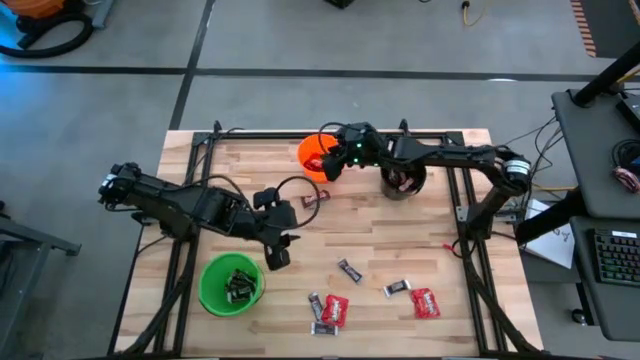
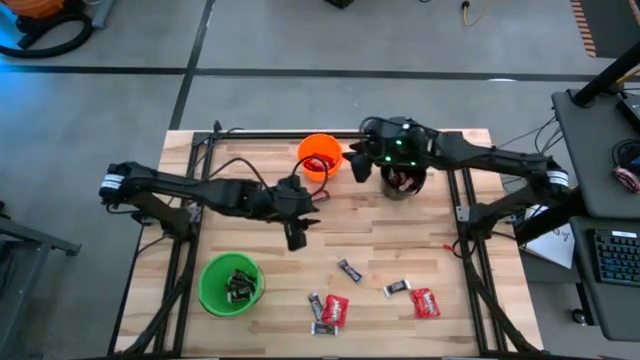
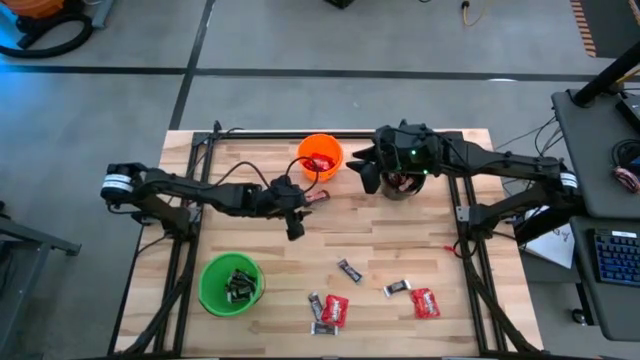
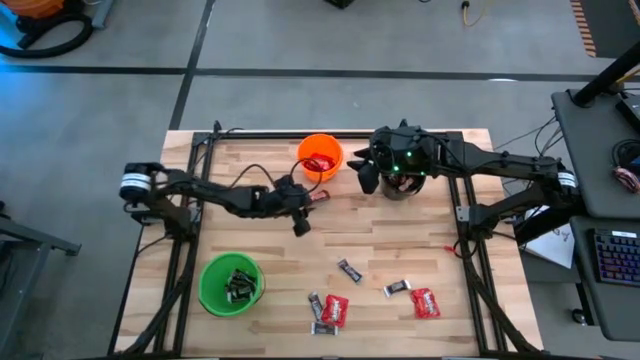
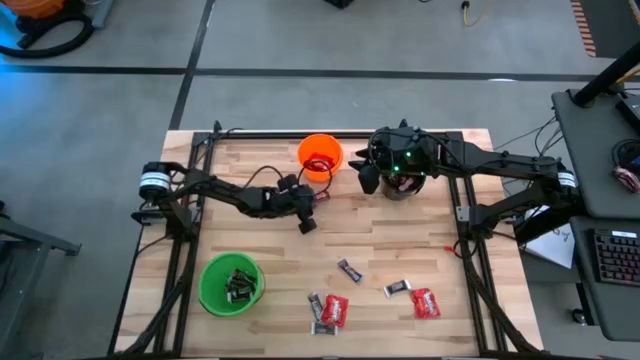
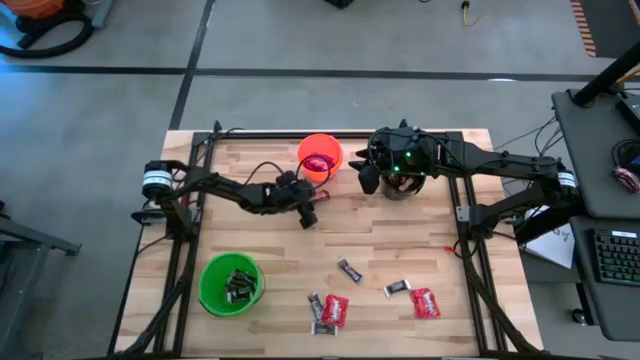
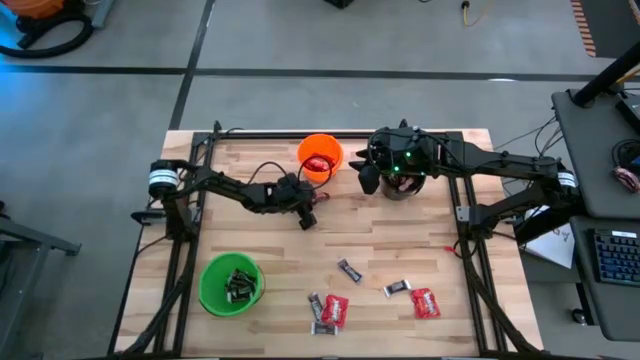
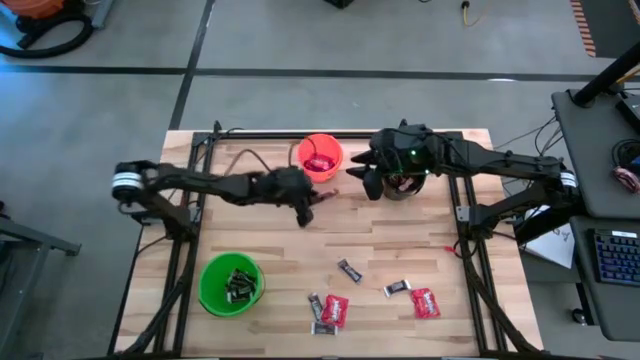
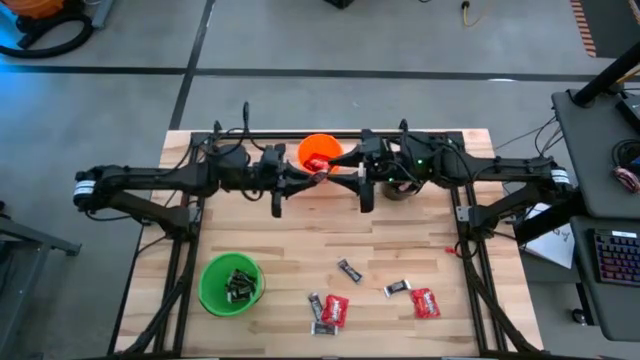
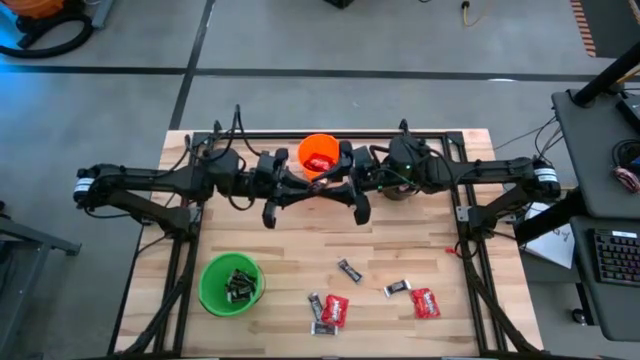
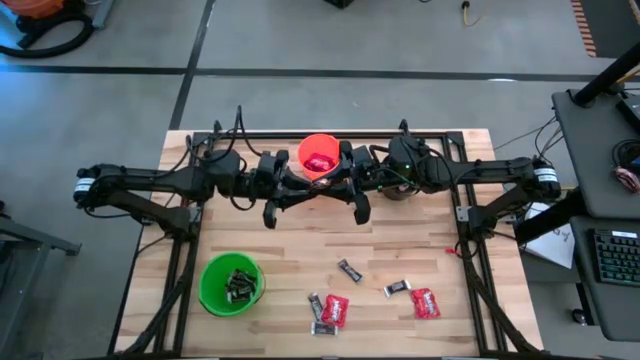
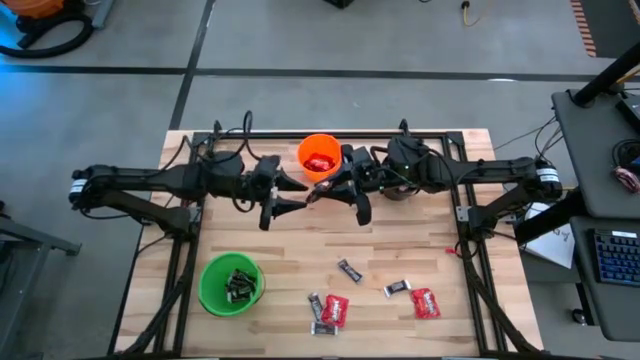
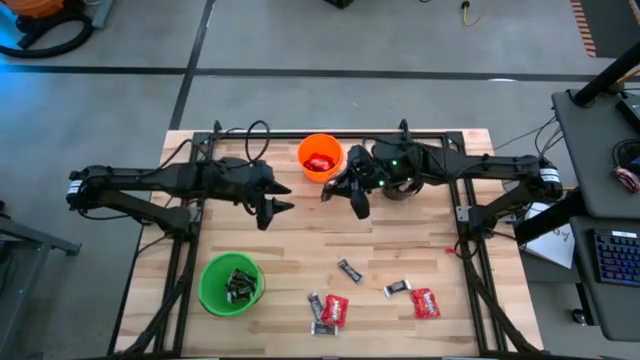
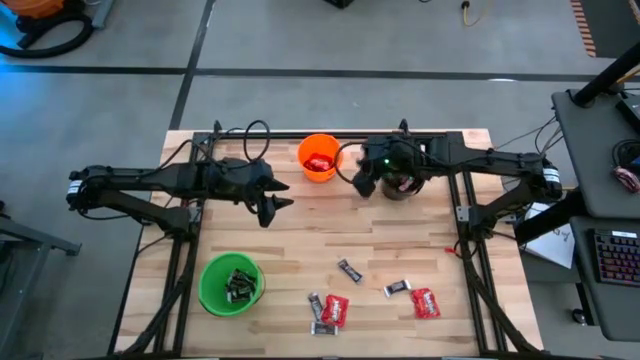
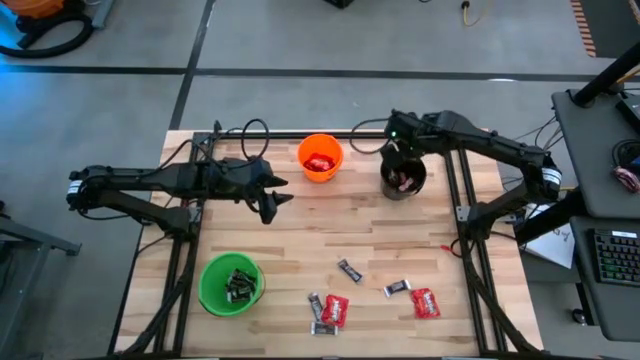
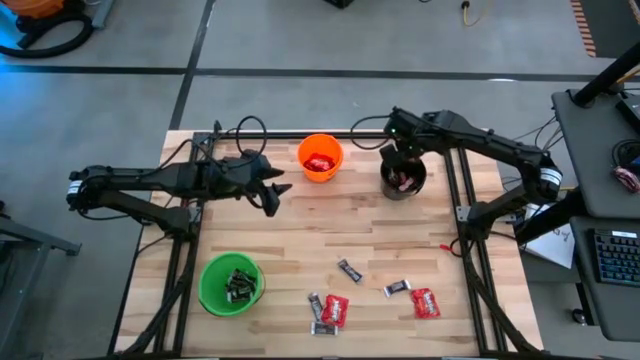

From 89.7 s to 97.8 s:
Task: Sort candy
Put the brown chocolate into the black bucket

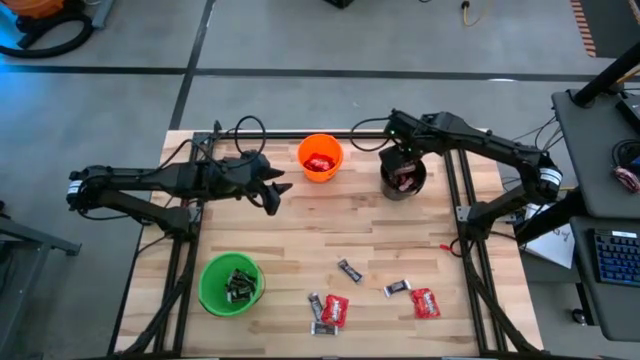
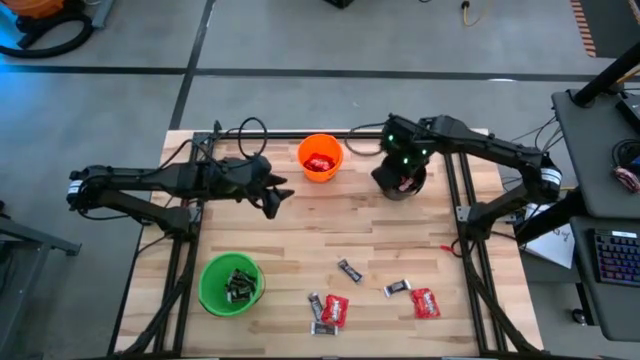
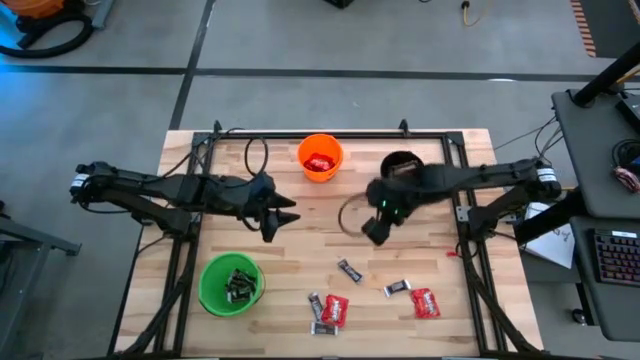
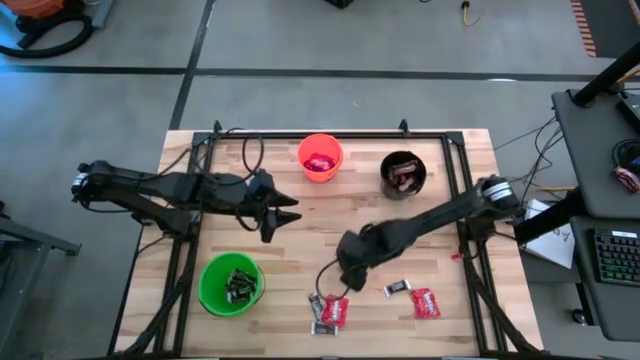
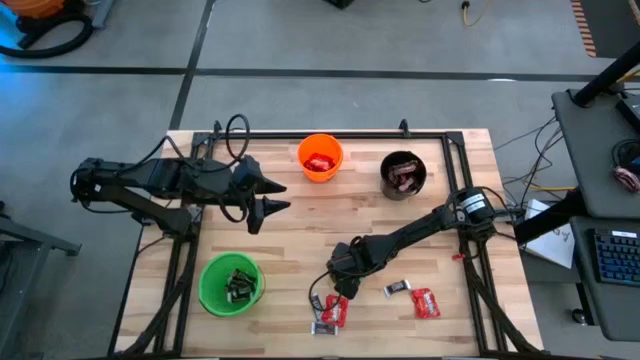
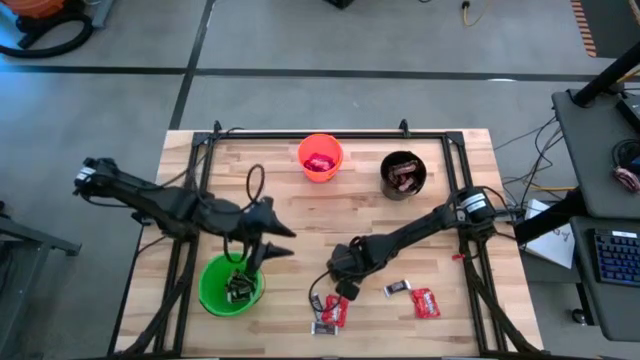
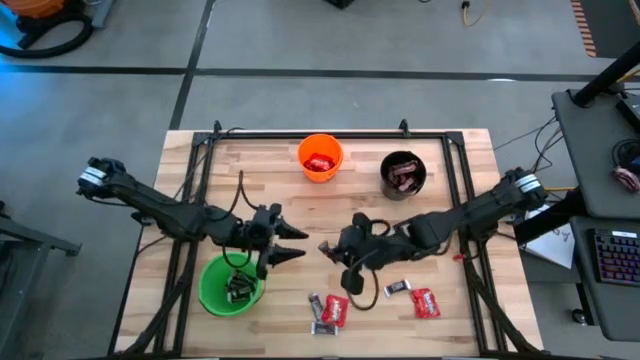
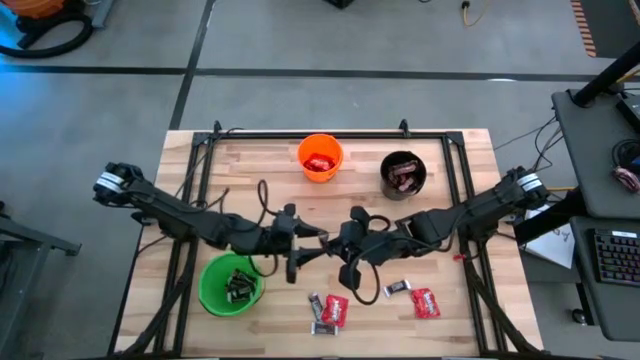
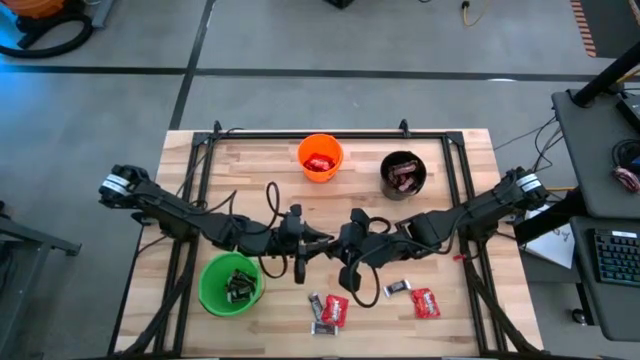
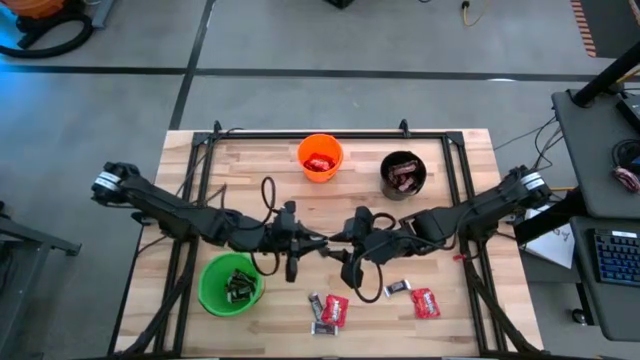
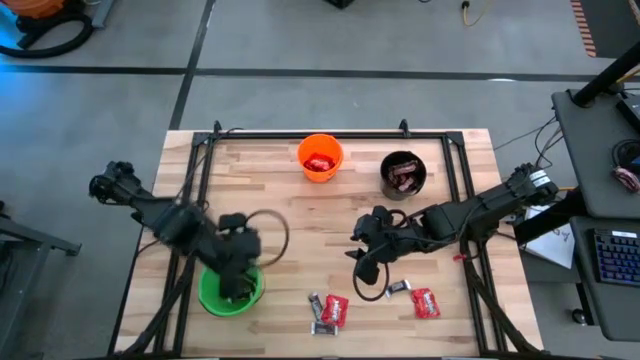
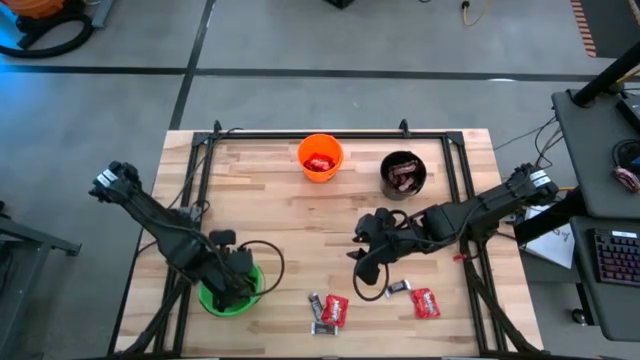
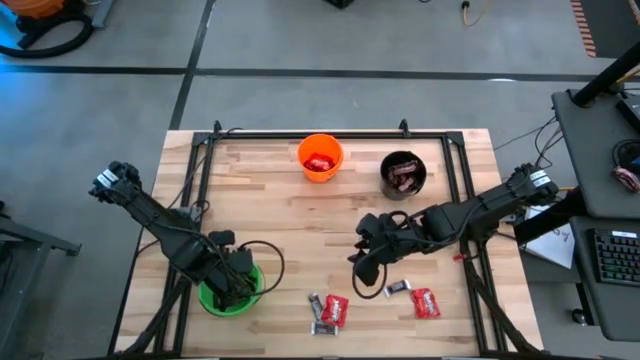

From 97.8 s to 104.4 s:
Put the black chocolate into the green bucket

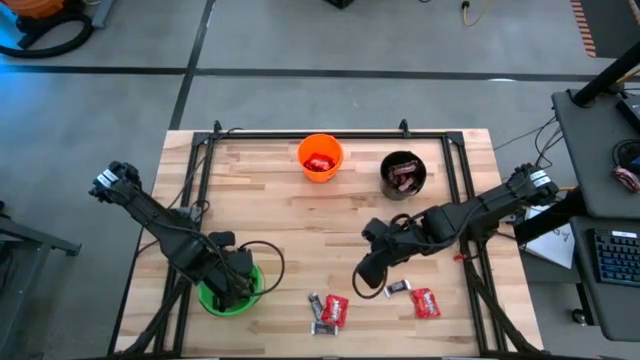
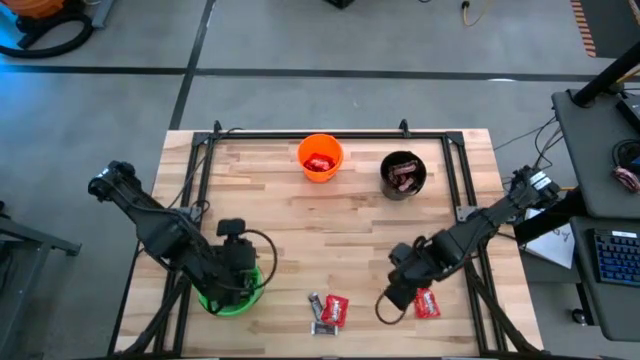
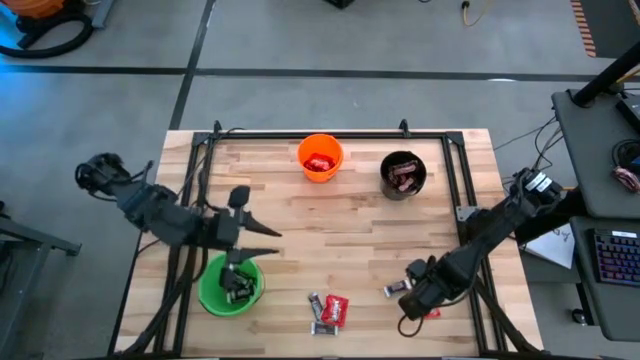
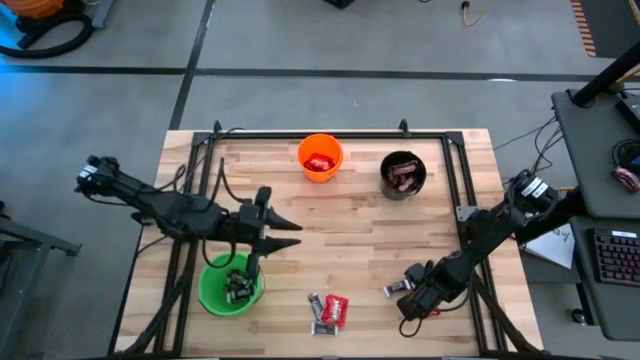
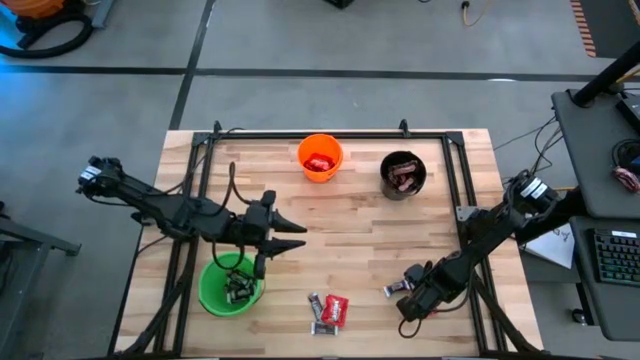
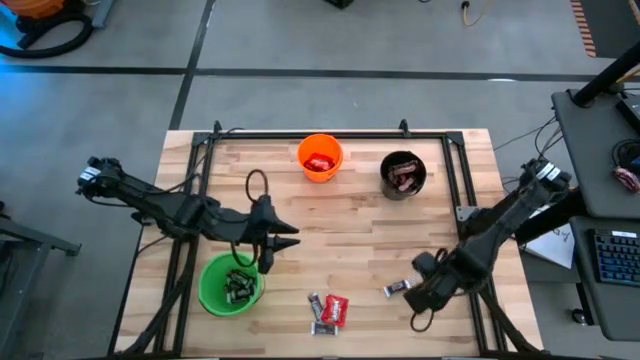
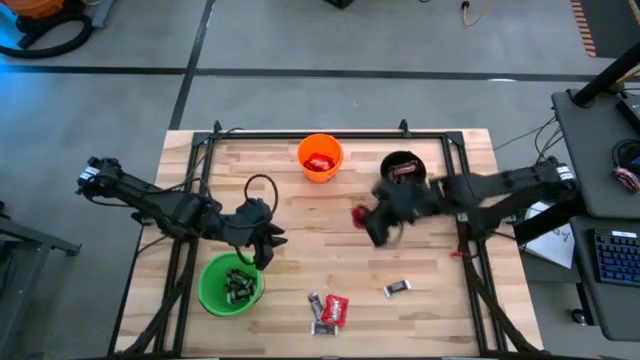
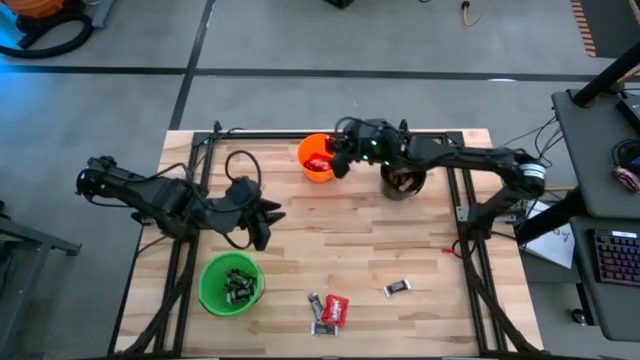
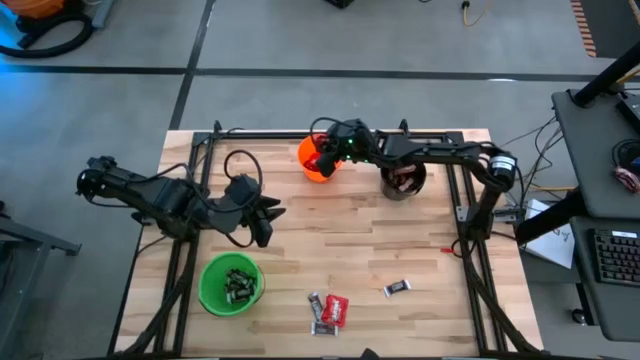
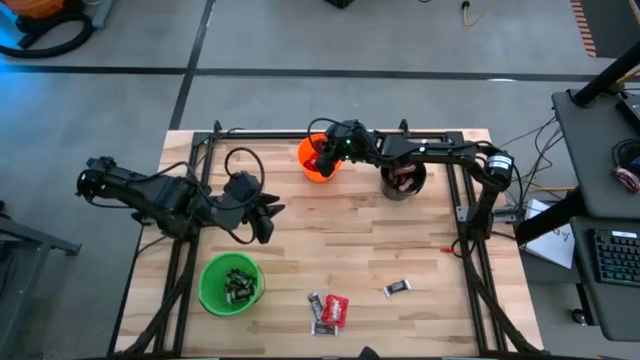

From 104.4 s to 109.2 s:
Put the red candy into the orange bucket

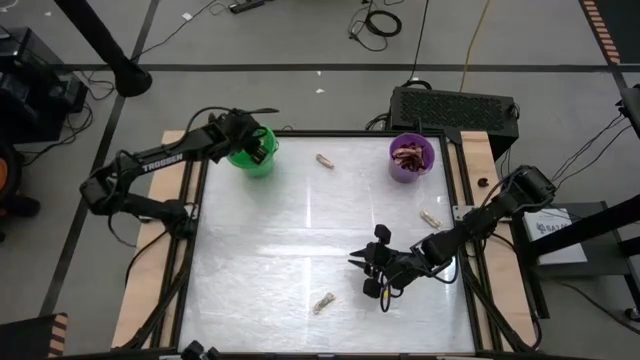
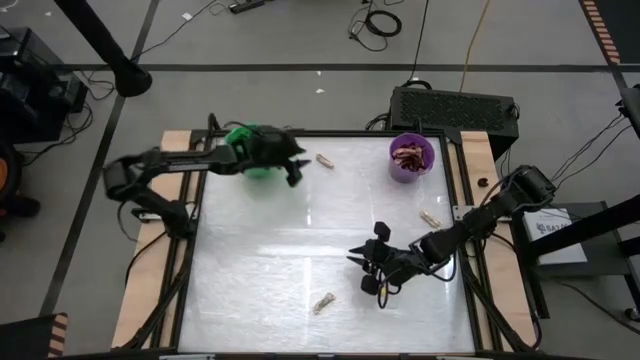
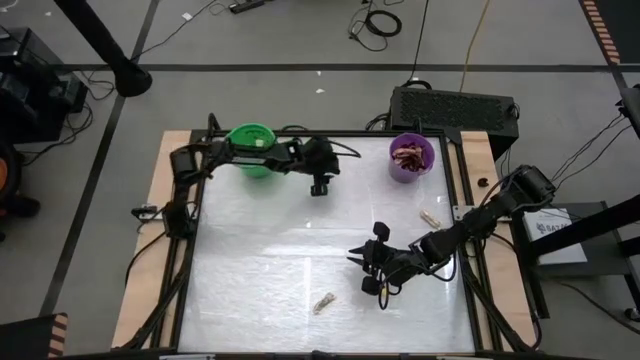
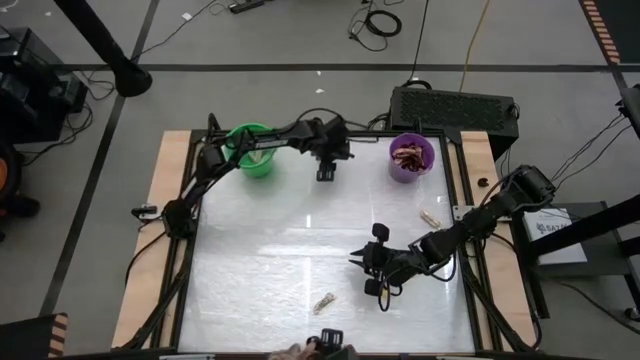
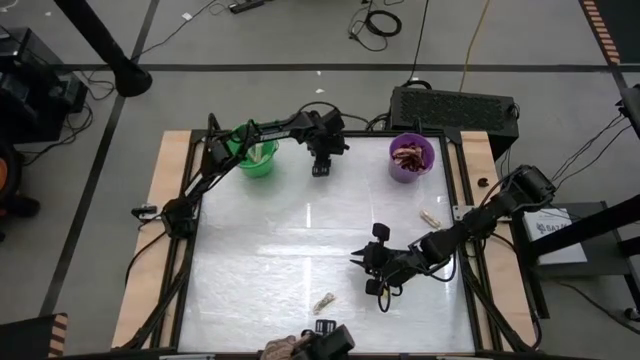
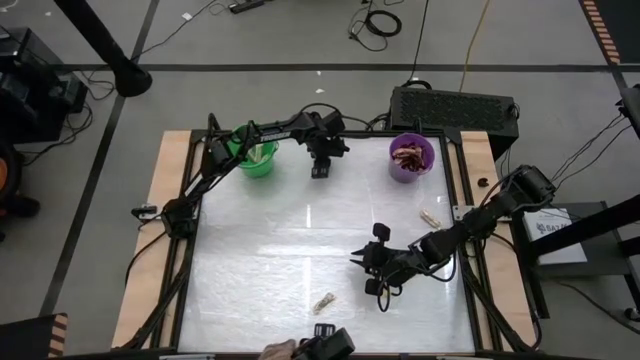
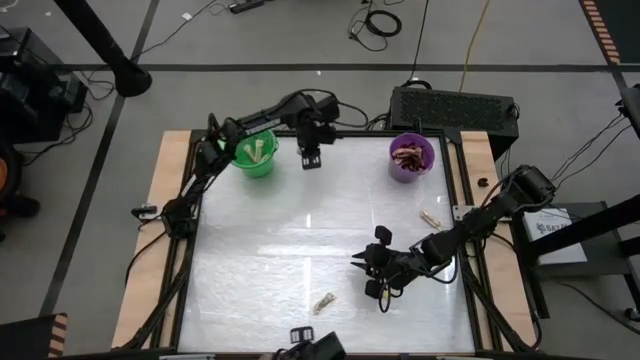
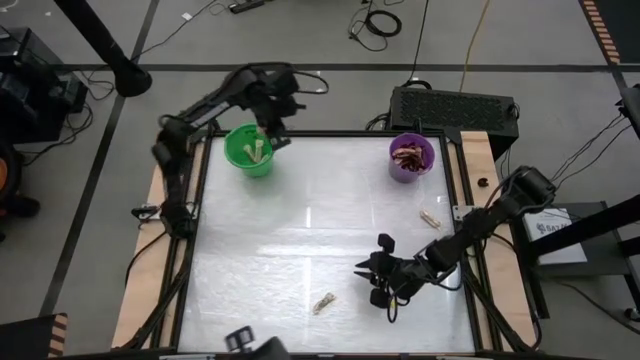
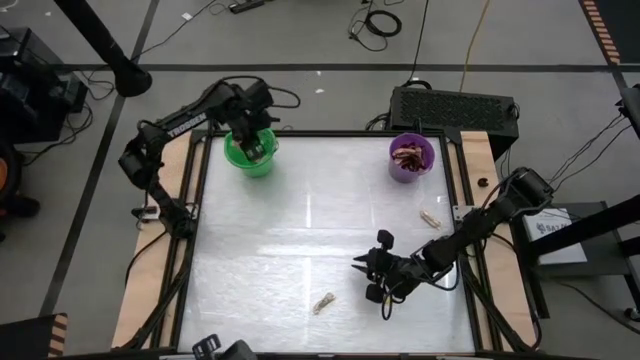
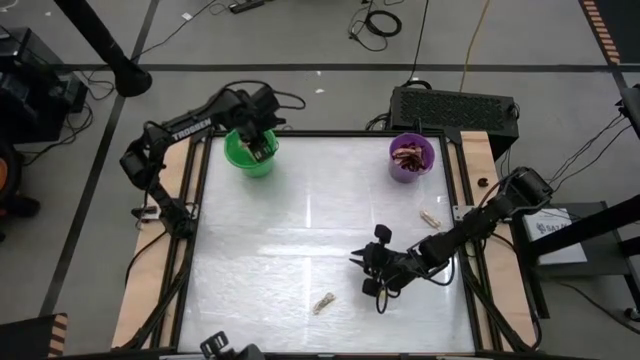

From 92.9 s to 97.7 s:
Task: Sort candy by brand, put in halloween buckets
Put the white chocolate bar into the green bucket
